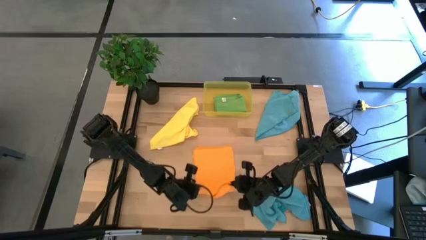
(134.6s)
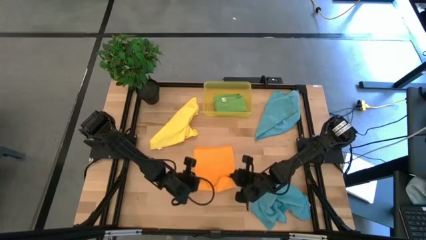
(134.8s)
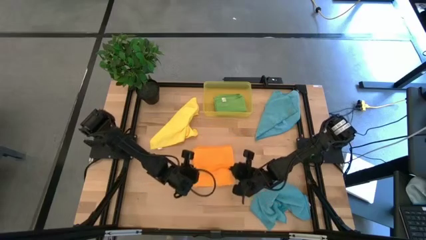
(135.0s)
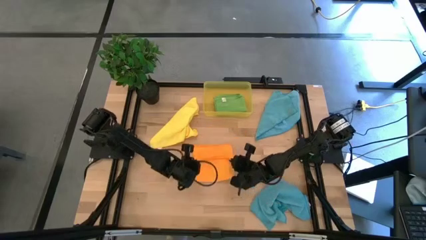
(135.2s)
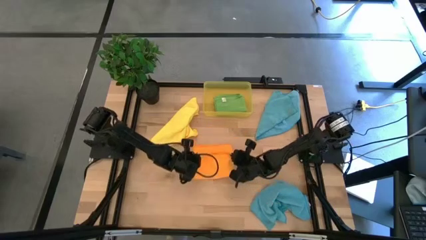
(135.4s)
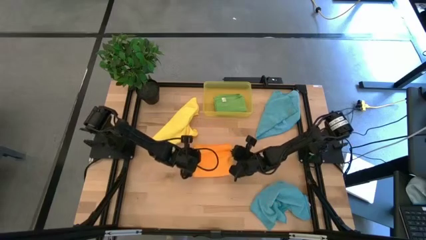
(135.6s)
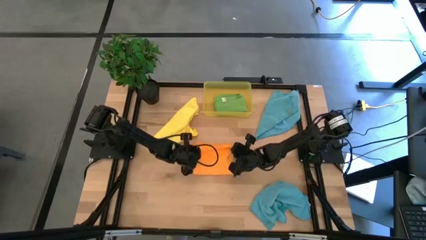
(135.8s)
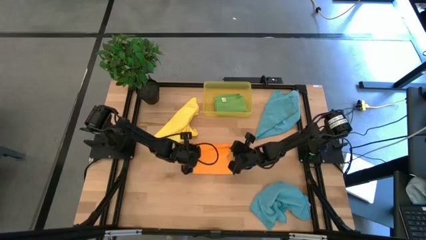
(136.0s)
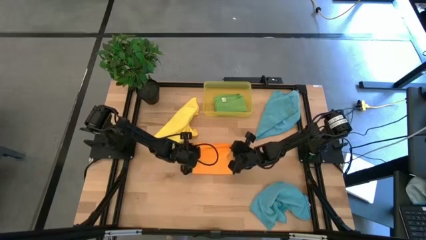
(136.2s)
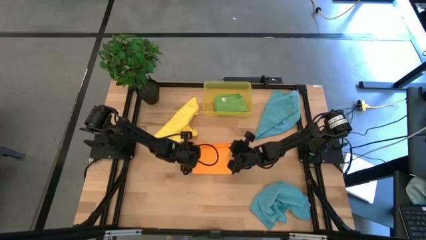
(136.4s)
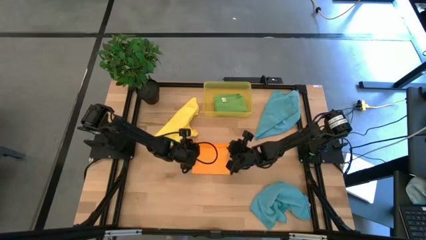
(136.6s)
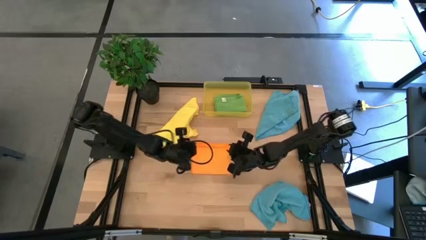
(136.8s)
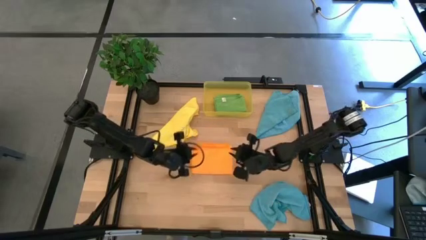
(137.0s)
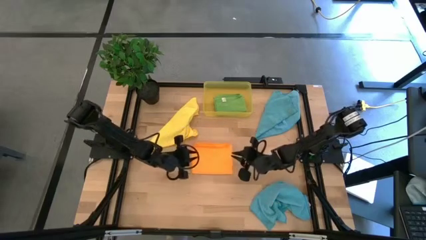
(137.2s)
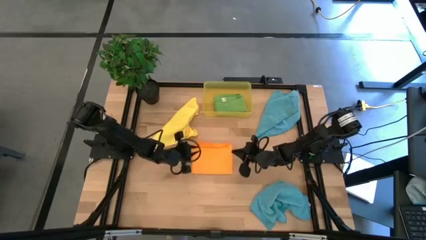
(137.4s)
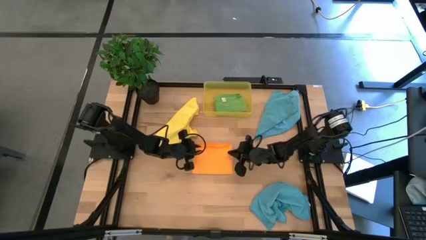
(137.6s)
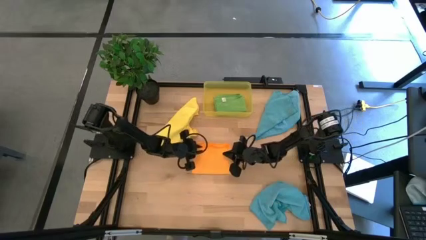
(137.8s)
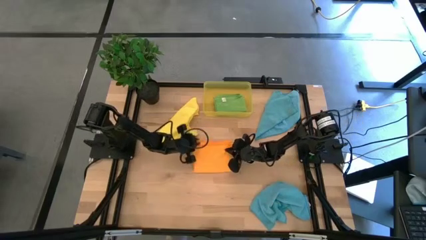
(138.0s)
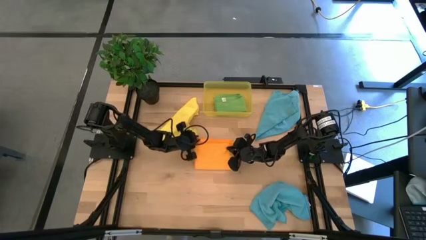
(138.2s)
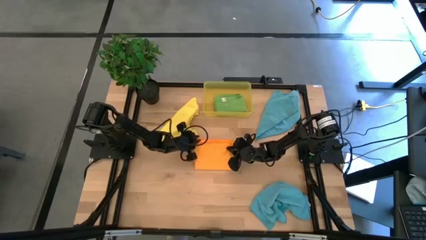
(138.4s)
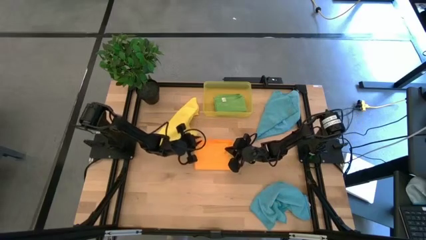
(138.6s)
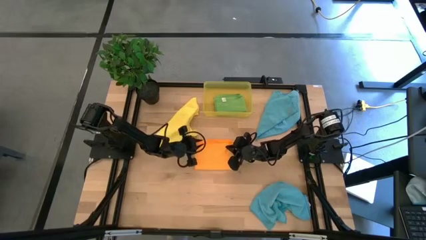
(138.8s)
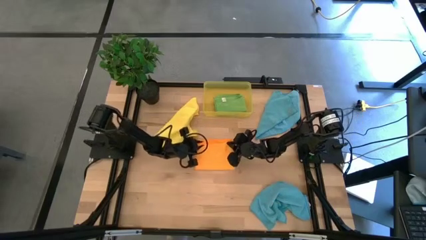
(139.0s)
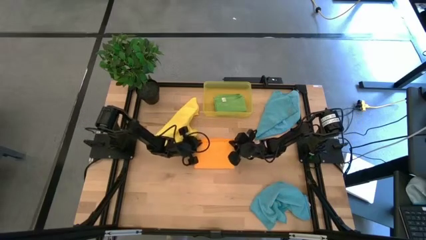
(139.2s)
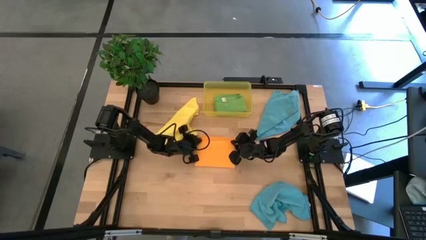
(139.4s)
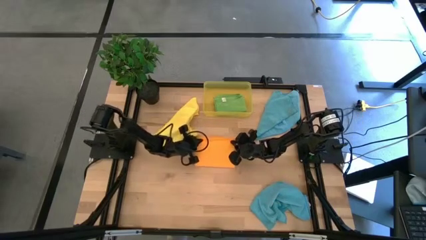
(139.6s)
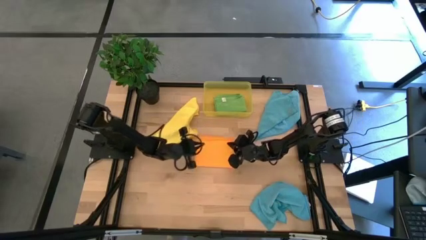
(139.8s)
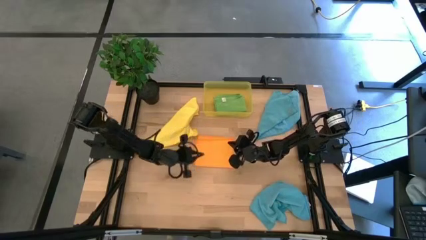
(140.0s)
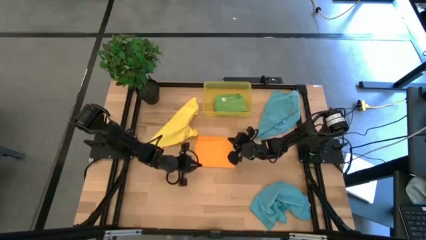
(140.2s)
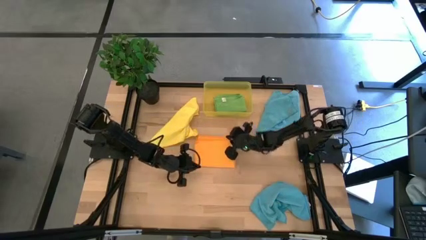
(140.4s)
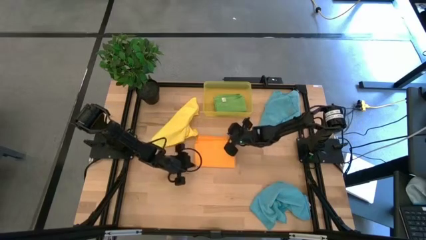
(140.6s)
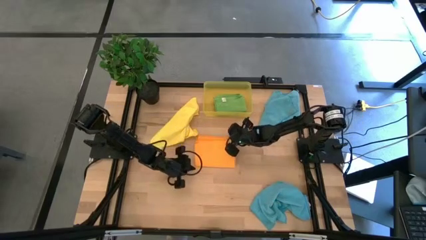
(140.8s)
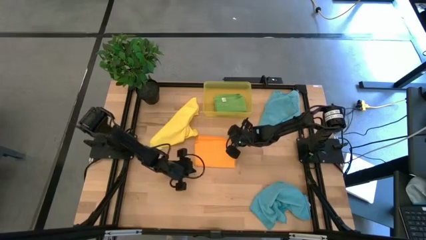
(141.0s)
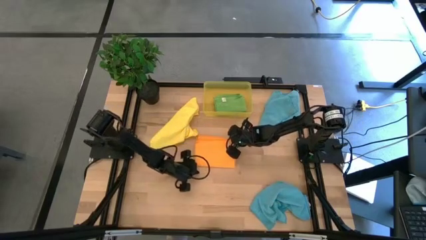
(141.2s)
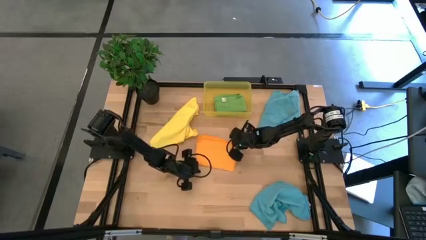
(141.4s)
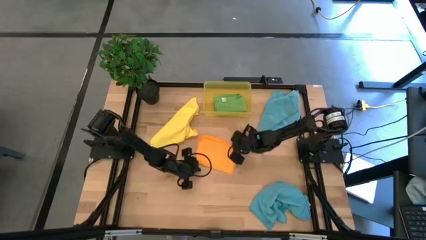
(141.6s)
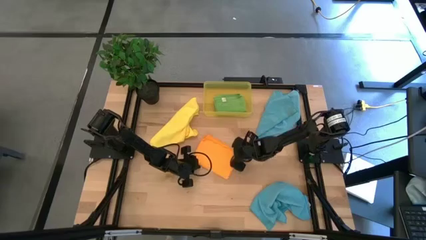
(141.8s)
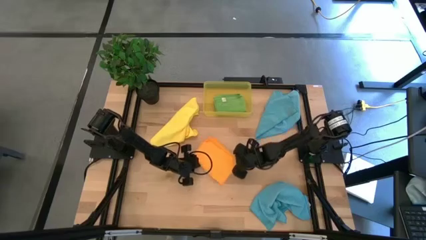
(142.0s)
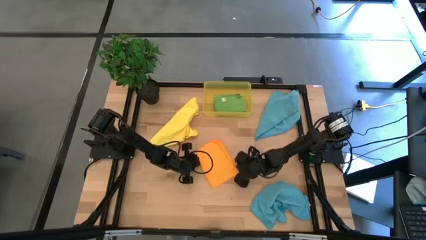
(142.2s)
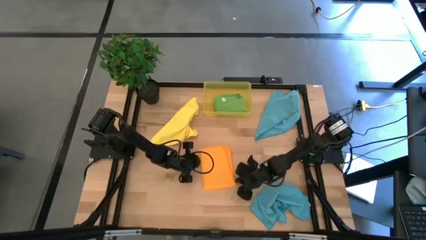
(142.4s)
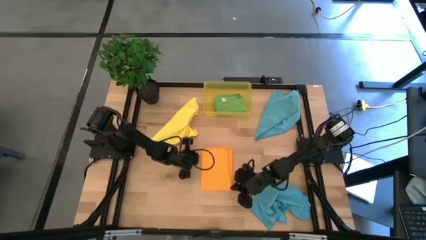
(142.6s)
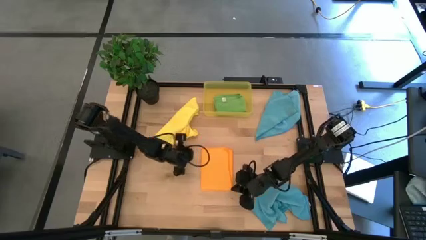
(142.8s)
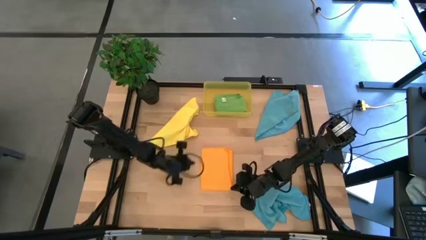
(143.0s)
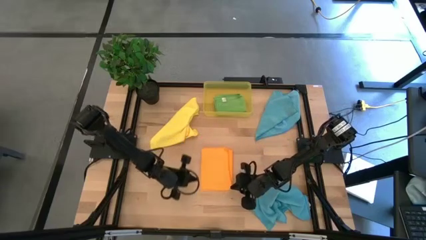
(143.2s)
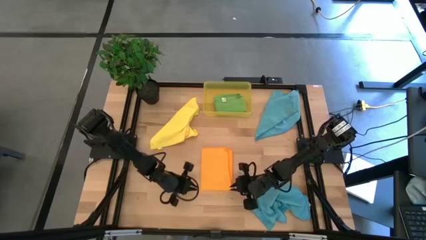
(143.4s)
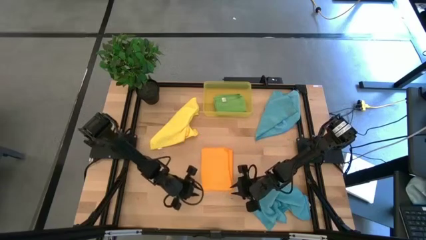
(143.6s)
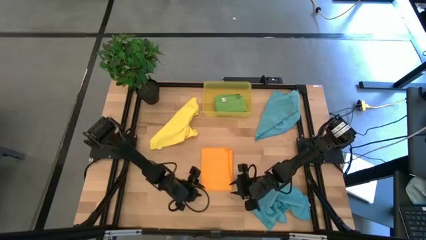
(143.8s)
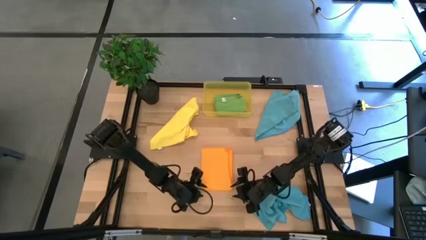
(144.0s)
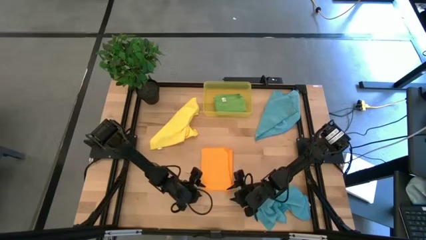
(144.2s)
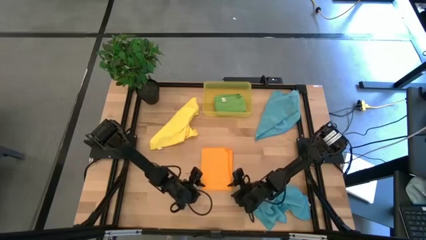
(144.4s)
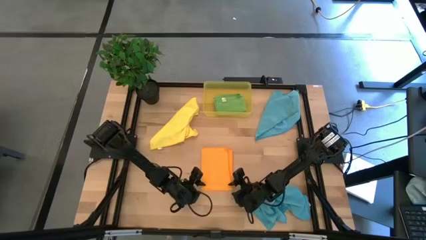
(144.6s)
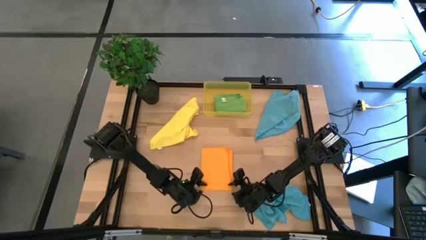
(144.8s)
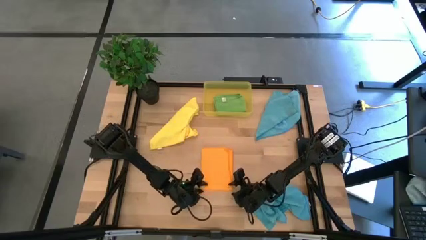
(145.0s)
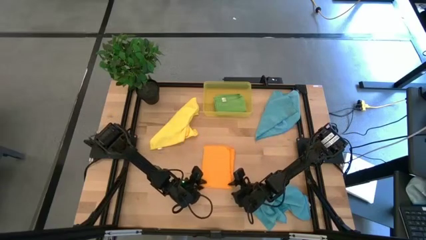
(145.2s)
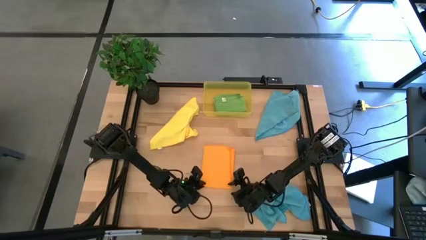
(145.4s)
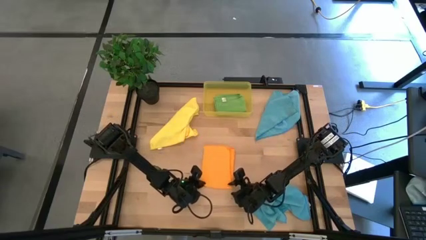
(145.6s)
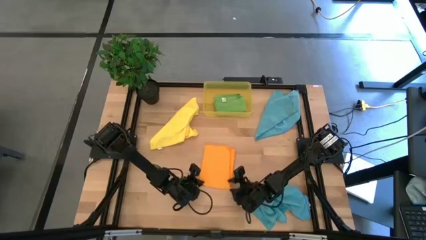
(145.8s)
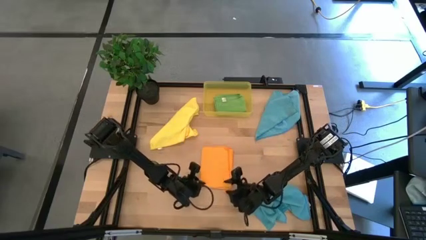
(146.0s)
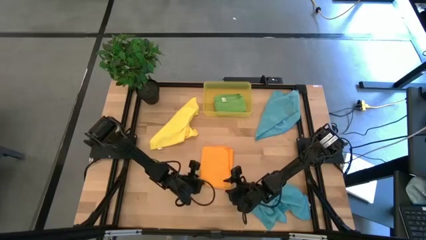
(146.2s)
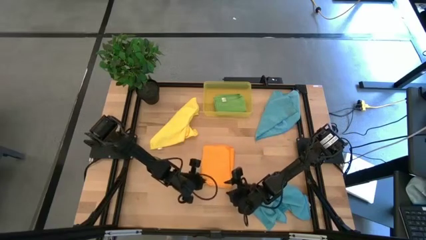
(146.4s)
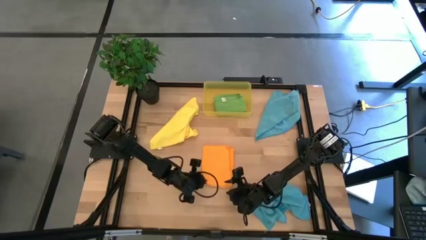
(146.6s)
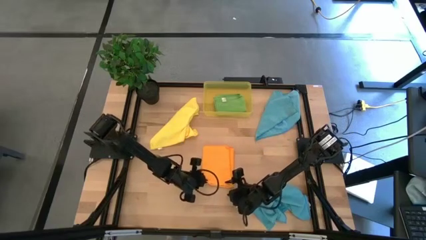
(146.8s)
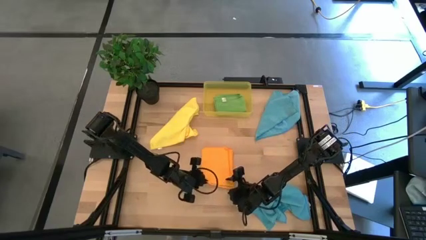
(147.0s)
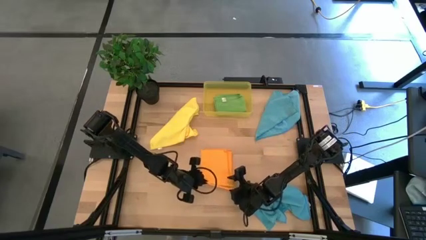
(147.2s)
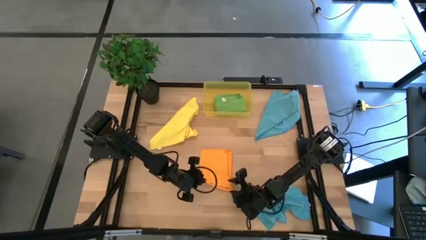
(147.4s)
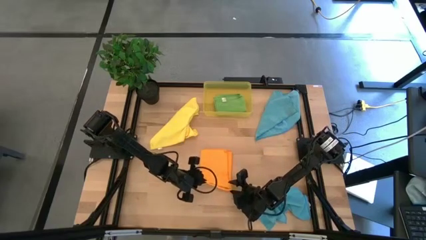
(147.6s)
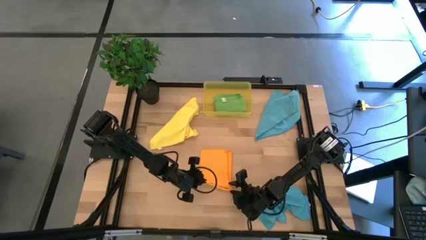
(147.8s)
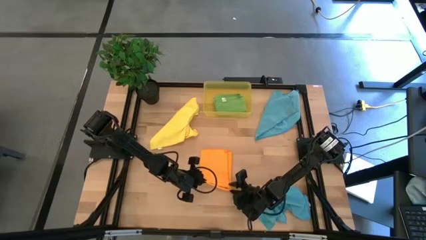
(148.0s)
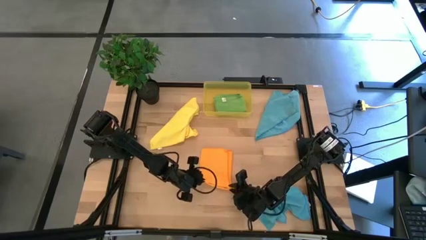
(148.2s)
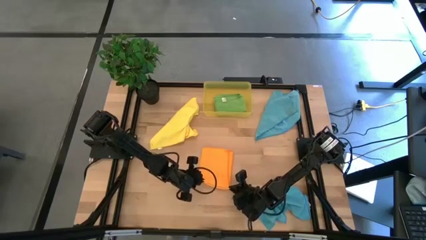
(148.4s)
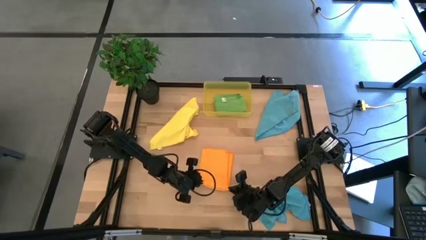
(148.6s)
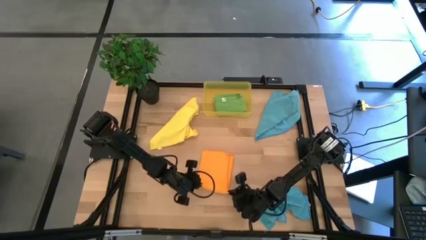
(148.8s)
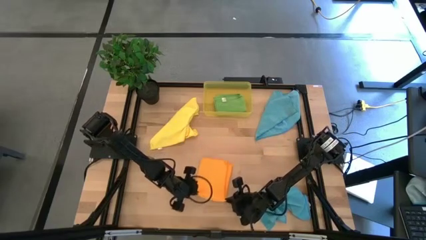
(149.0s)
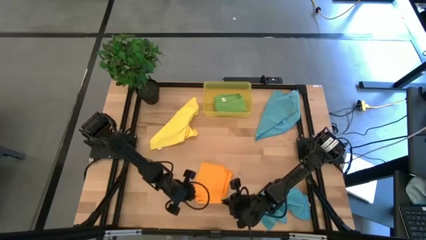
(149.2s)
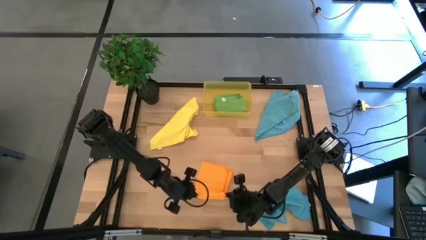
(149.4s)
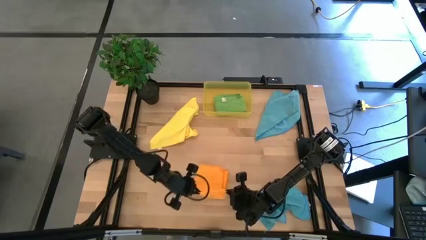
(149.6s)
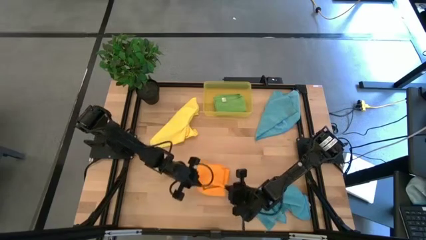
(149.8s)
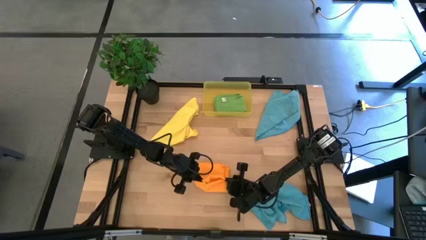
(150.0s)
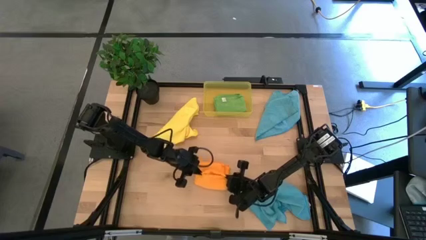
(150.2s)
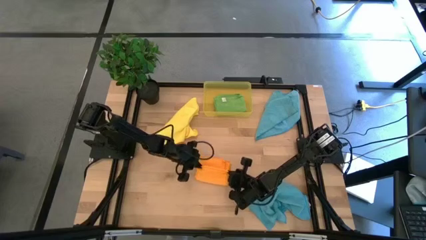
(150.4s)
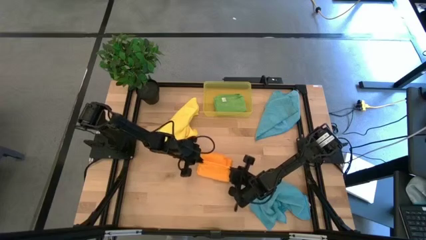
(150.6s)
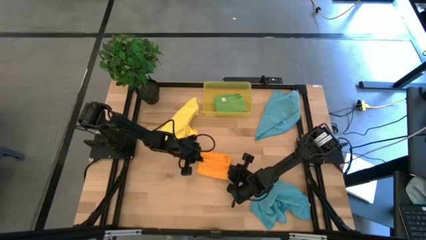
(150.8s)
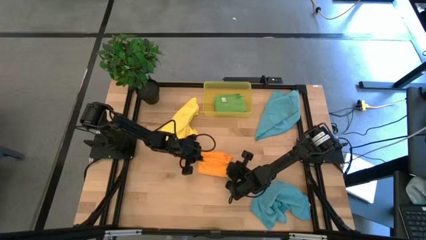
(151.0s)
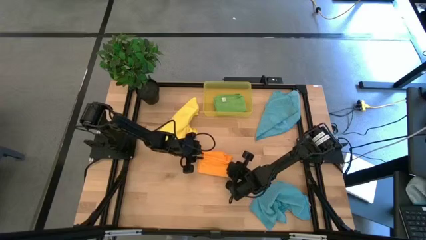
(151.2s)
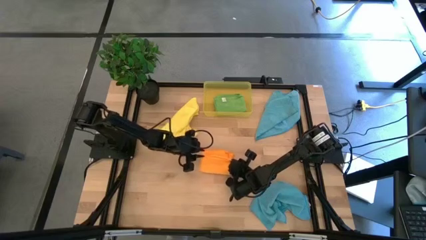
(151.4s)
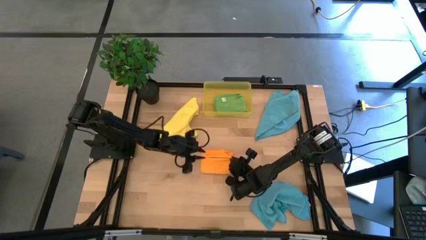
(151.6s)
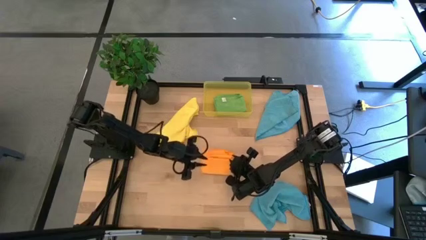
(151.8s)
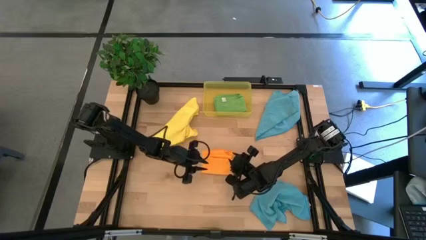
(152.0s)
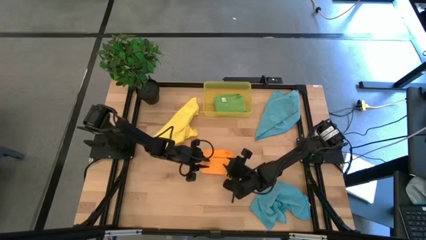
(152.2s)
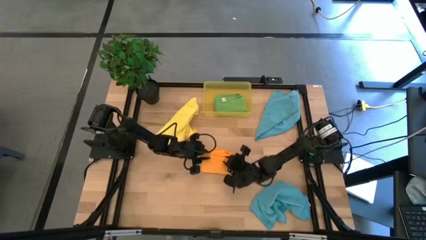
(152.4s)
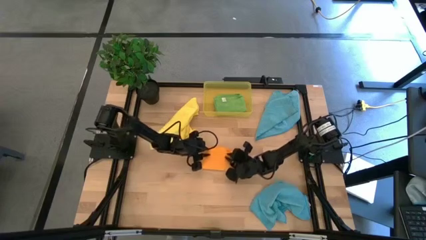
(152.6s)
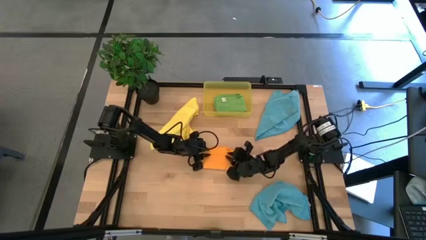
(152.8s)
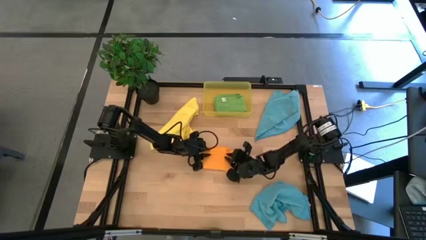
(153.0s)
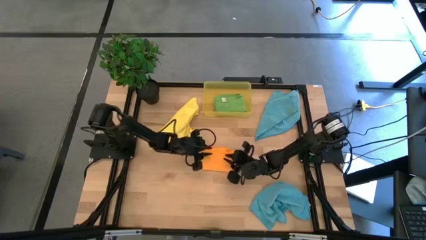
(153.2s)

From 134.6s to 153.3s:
Task: Fold microfiber towels
Fold the orange microfiber cloth
